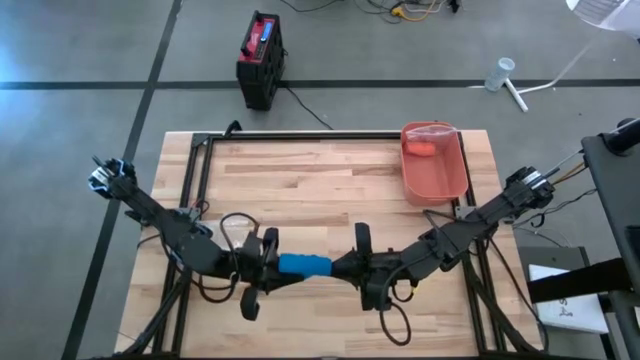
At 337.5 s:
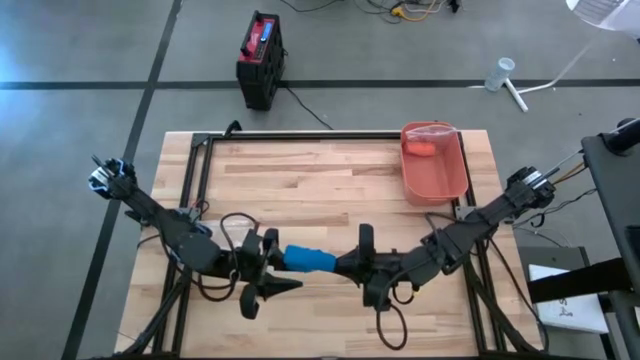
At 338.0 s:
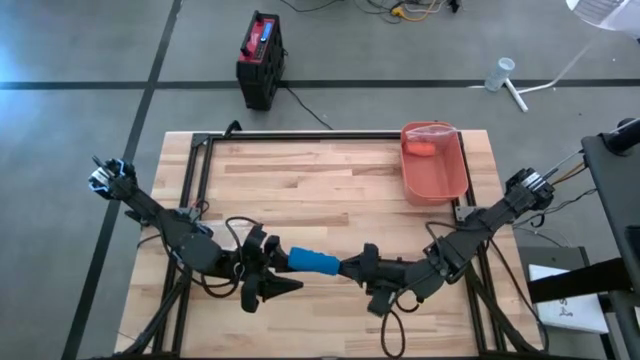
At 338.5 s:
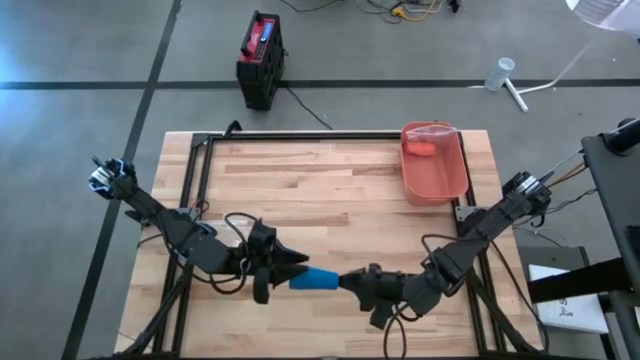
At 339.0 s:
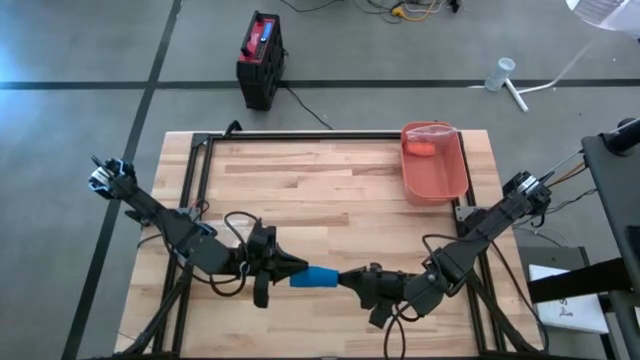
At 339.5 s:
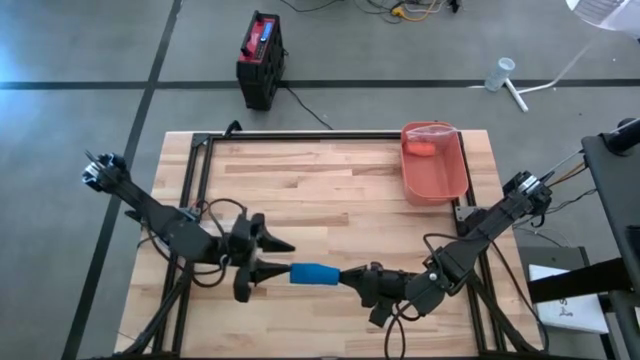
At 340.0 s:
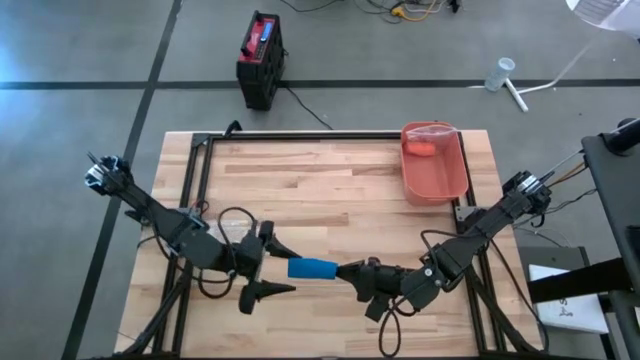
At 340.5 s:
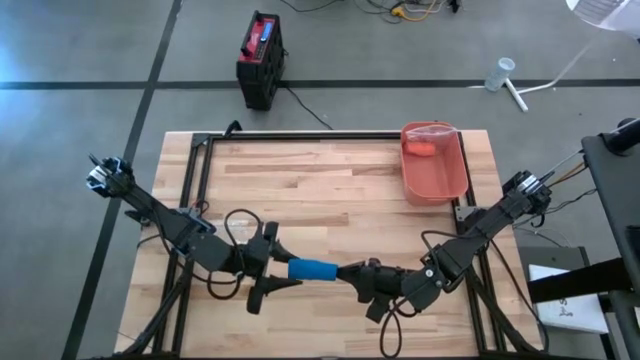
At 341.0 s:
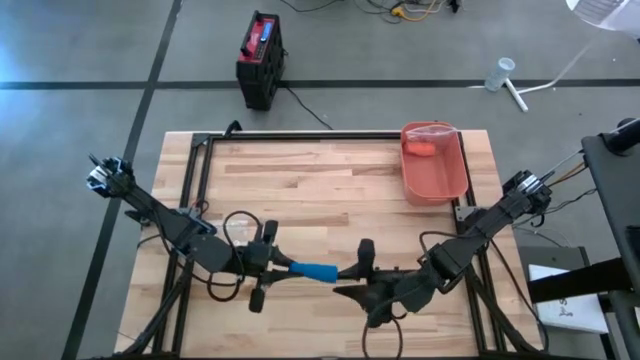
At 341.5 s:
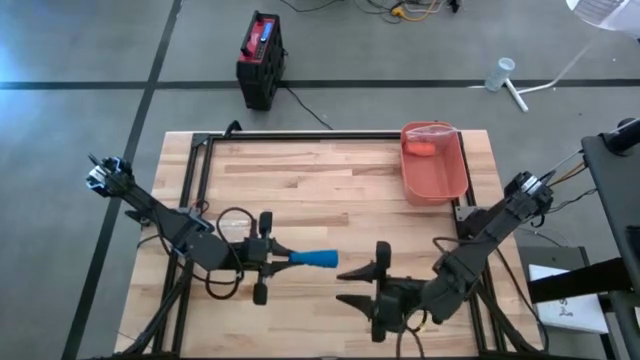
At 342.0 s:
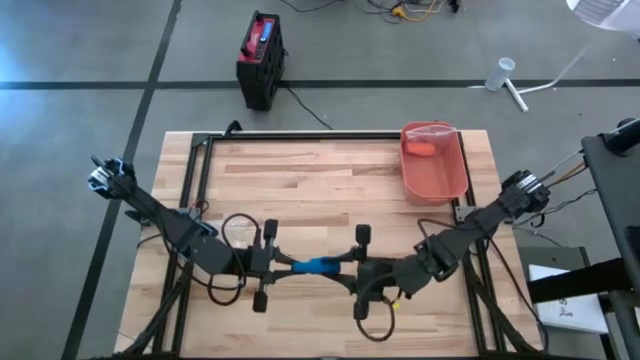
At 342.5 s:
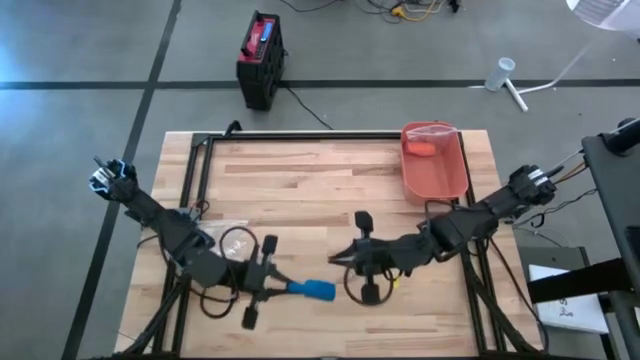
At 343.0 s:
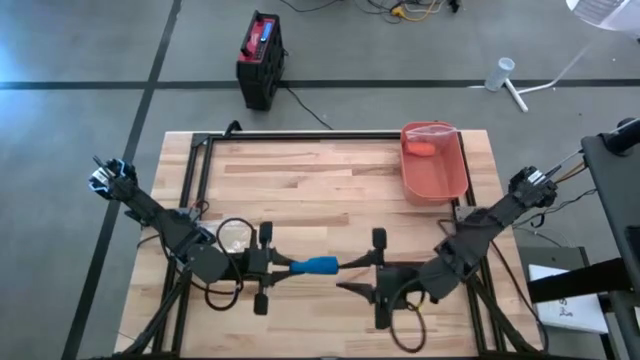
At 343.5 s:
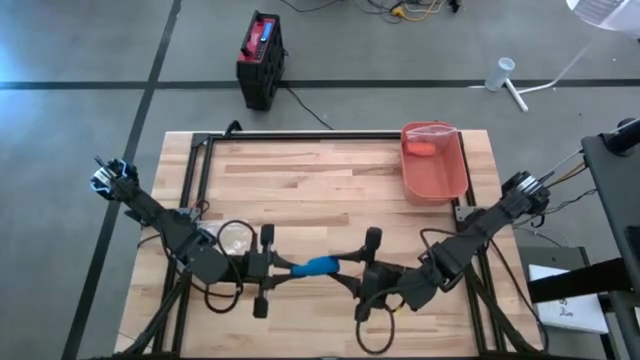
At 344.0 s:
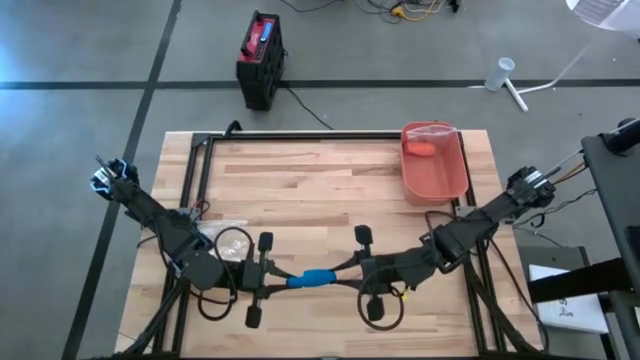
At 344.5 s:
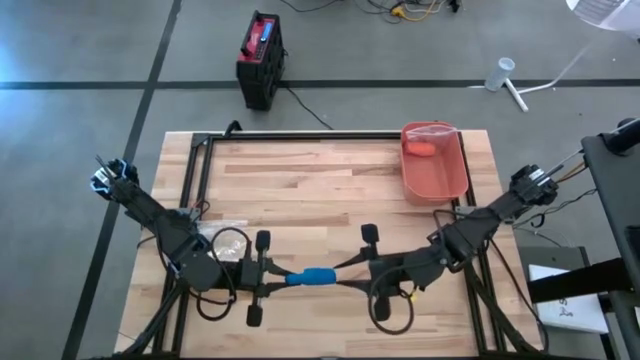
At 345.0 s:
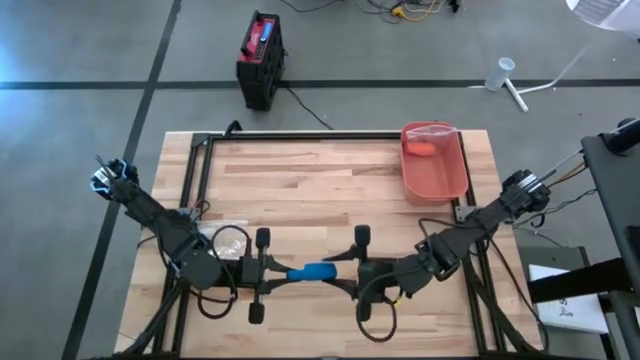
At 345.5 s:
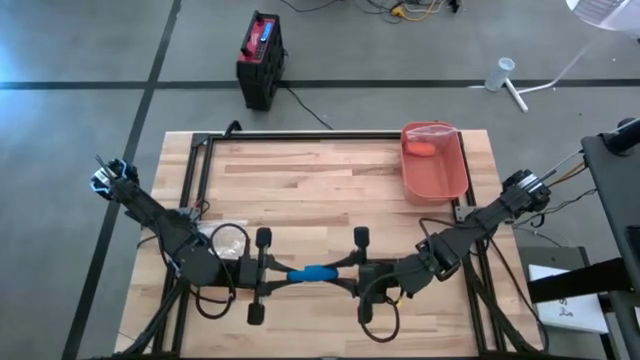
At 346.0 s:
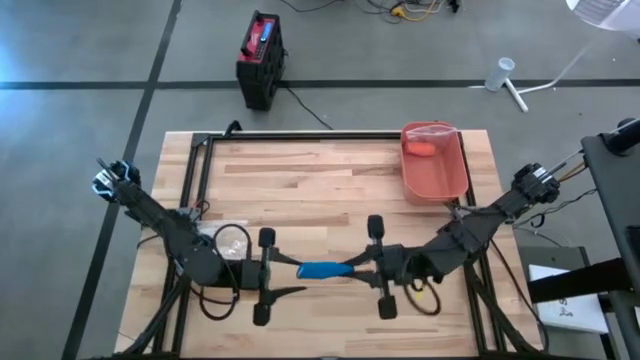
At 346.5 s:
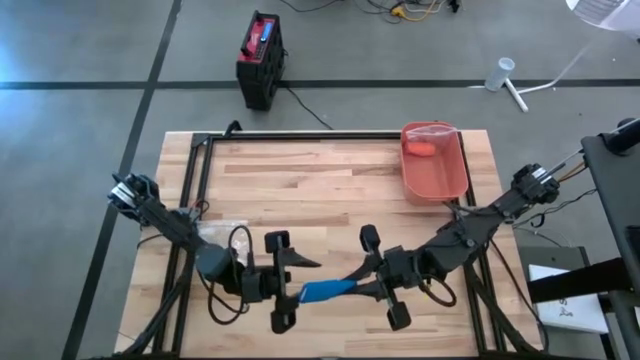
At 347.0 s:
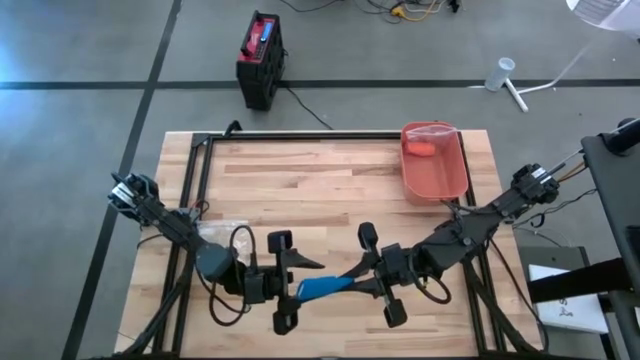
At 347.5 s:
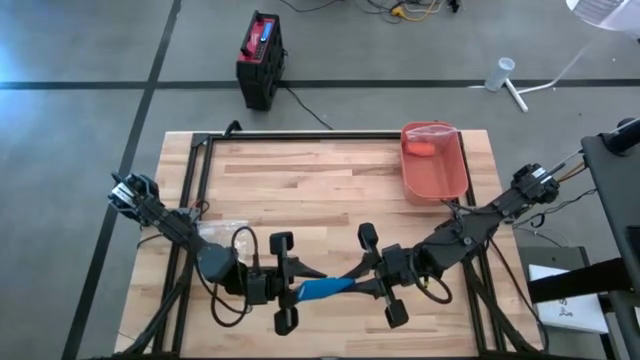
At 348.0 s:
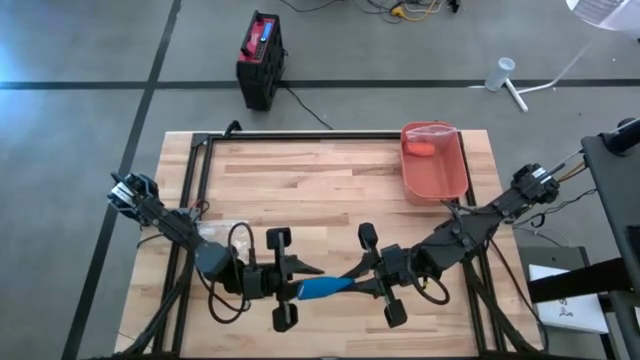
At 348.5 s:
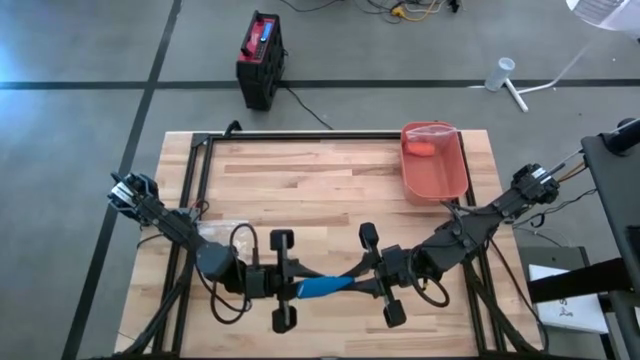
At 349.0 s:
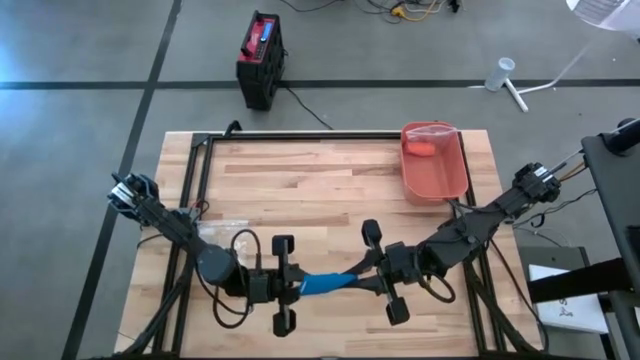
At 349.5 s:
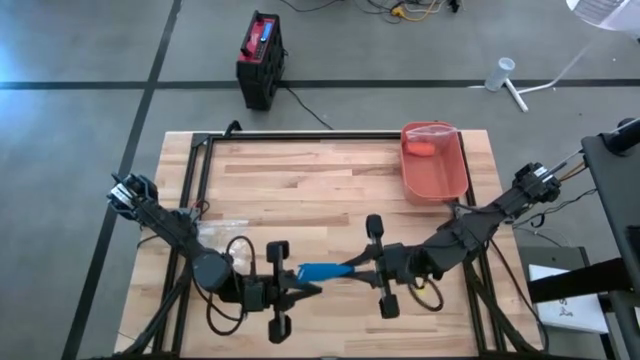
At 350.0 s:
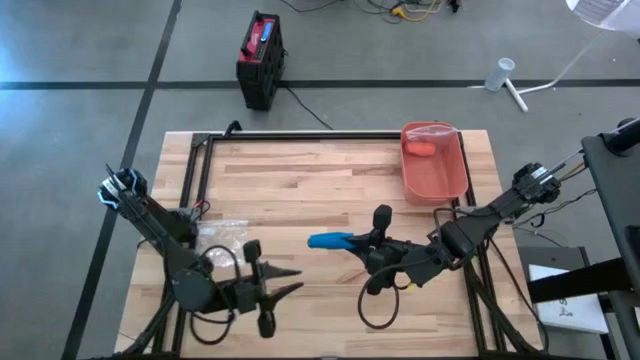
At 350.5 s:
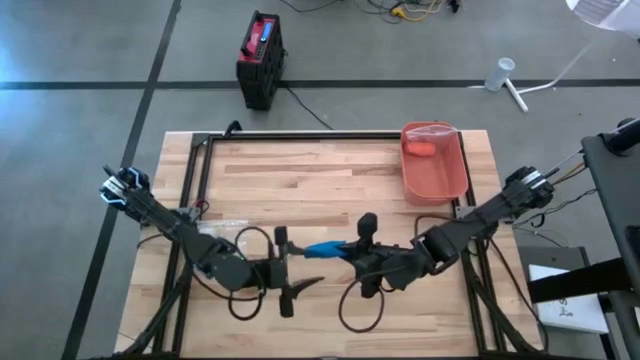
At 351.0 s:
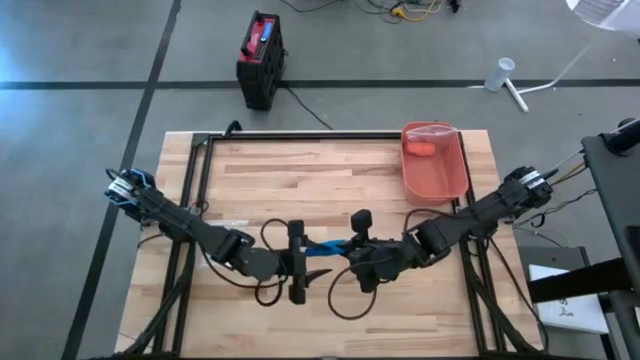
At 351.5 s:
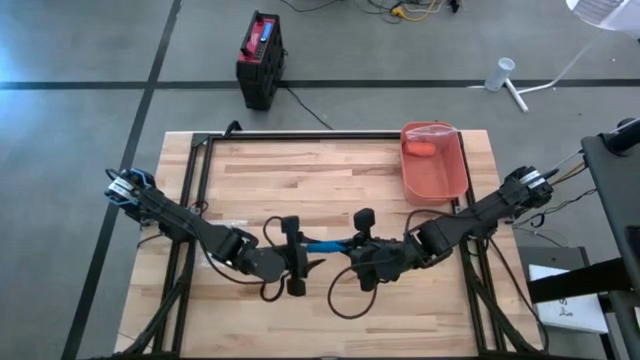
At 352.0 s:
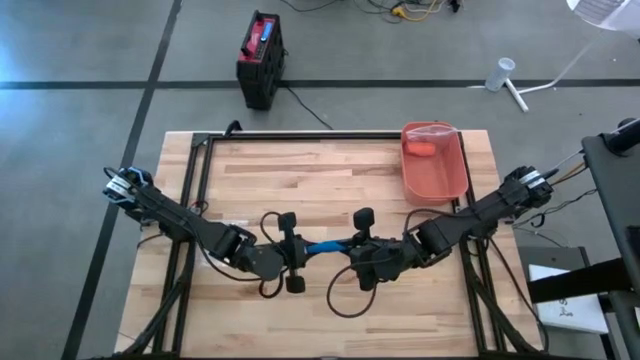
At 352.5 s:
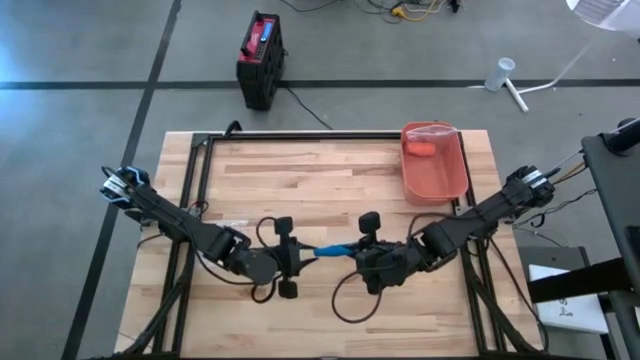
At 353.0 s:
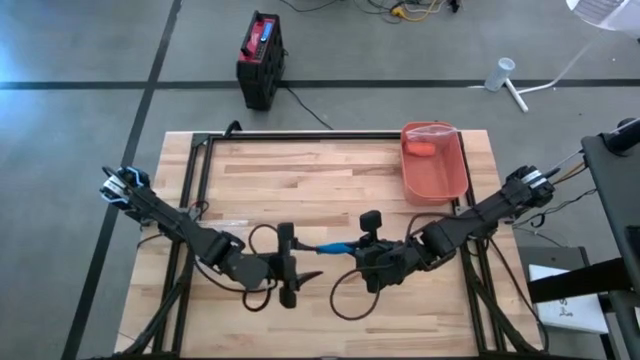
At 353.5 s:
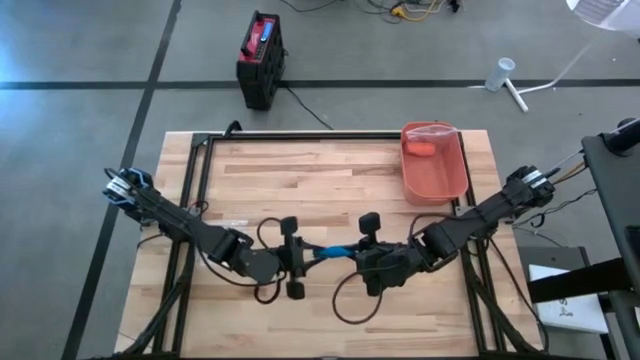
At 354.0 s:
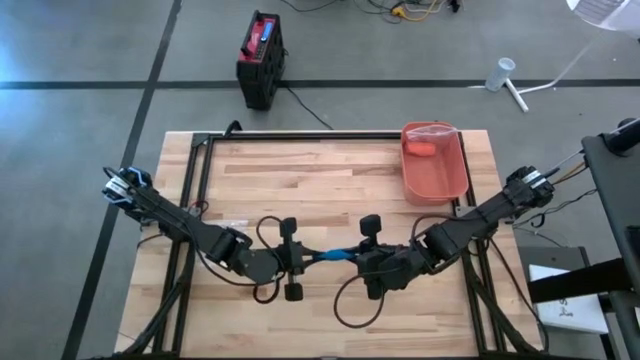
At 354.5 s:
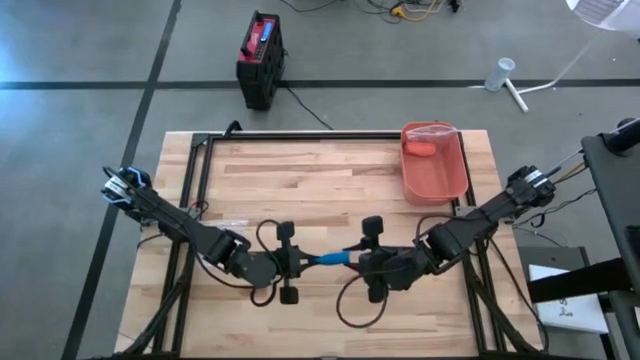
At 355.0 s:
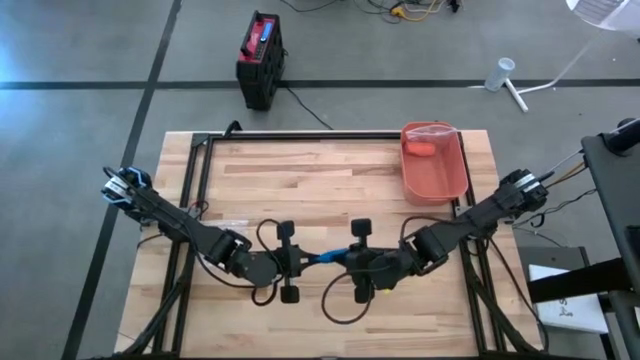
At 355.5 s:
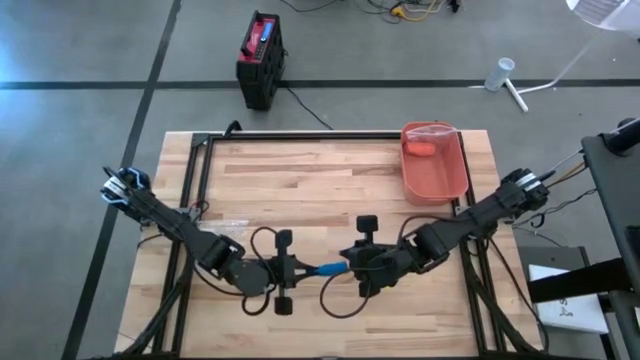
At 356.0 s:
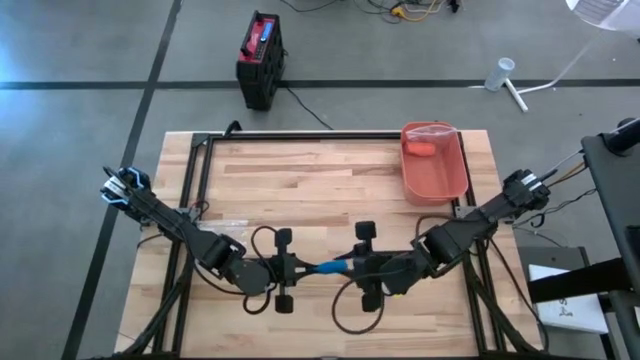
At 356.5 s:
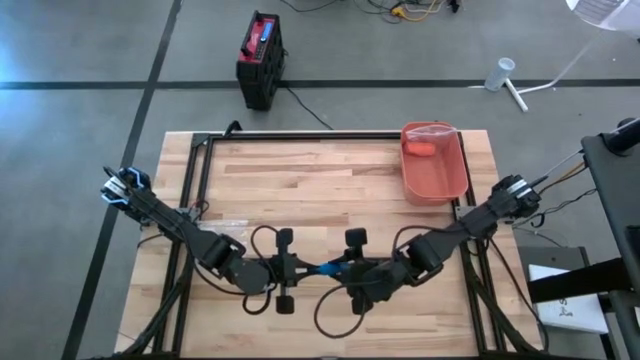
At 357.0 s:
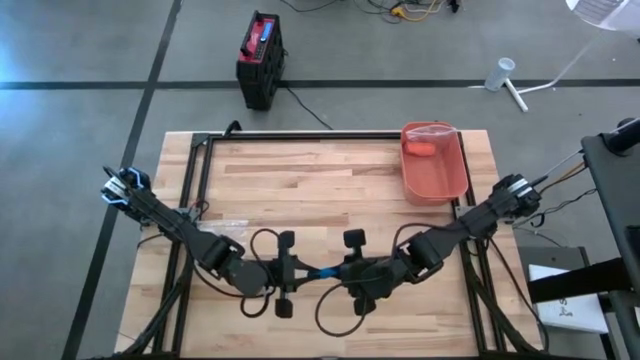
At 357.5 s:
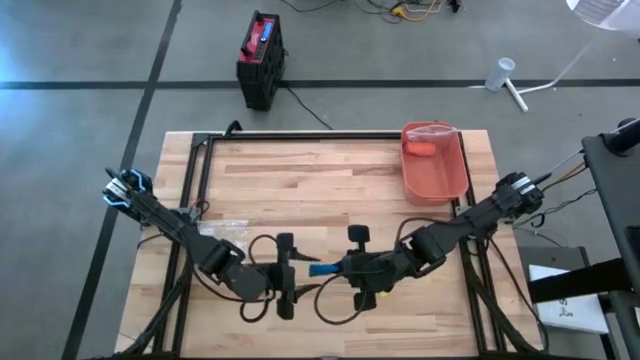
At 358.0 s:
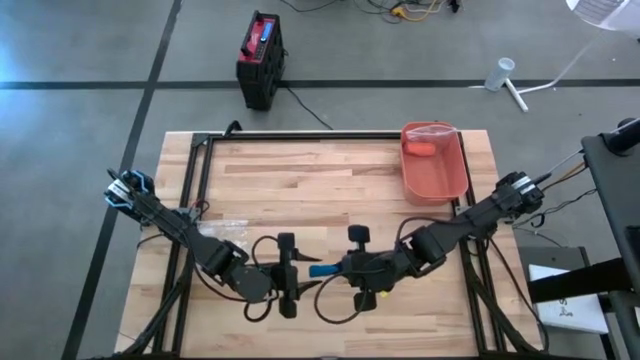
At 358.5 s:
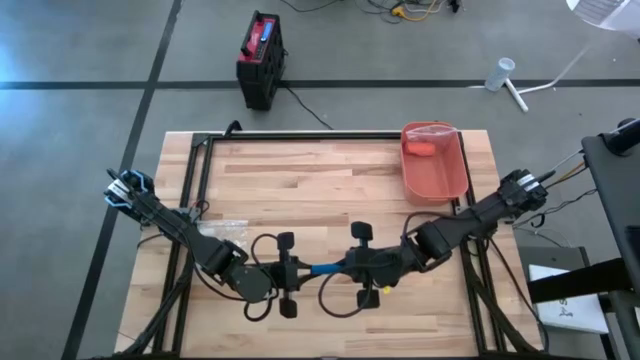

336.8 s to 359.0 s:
Task: Roll bandage
Roll the blue bandage
